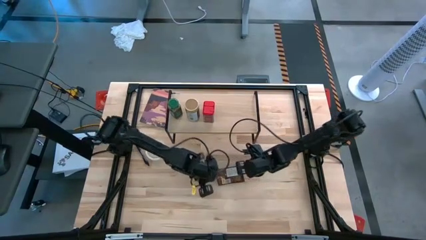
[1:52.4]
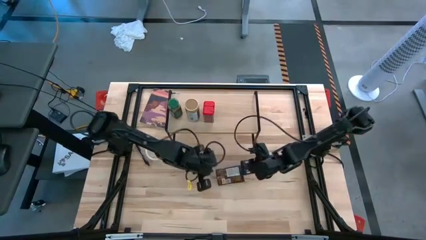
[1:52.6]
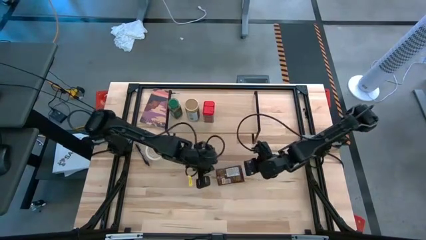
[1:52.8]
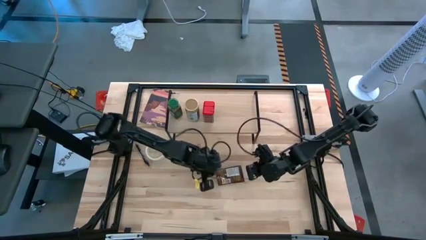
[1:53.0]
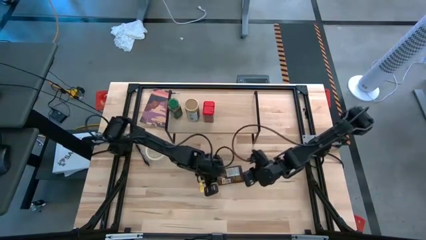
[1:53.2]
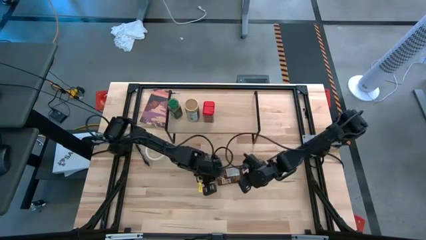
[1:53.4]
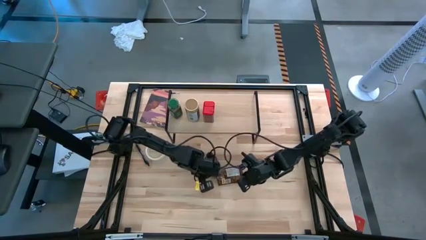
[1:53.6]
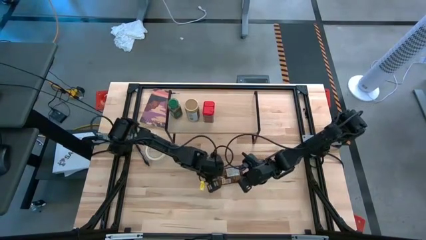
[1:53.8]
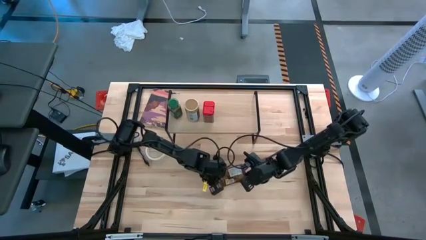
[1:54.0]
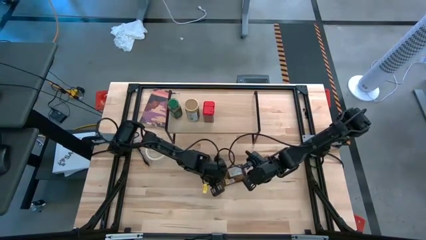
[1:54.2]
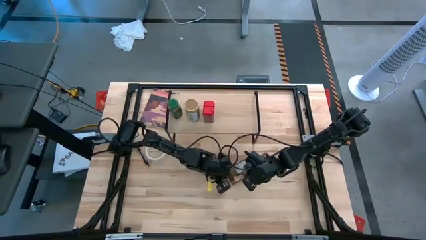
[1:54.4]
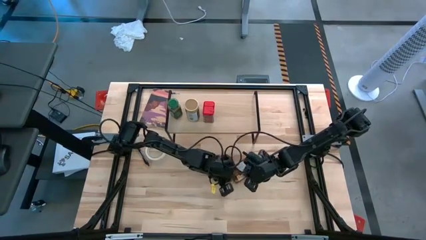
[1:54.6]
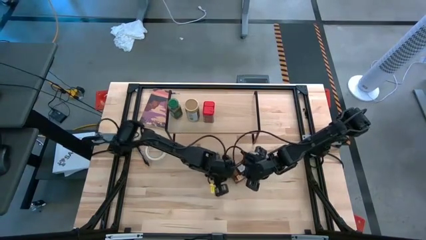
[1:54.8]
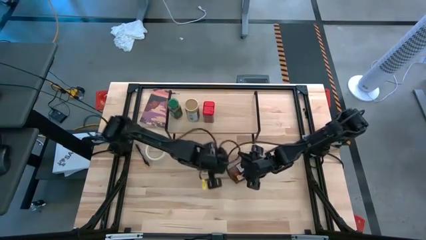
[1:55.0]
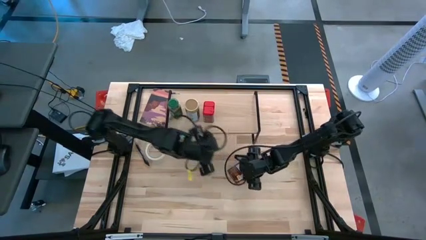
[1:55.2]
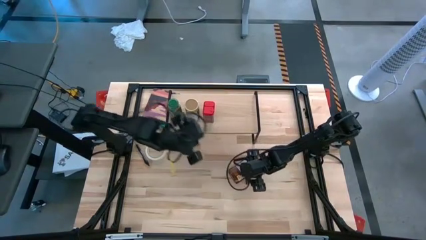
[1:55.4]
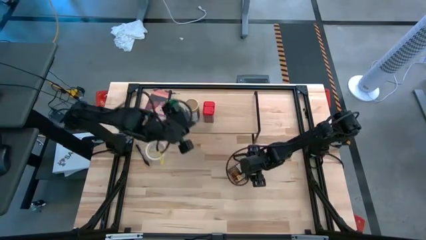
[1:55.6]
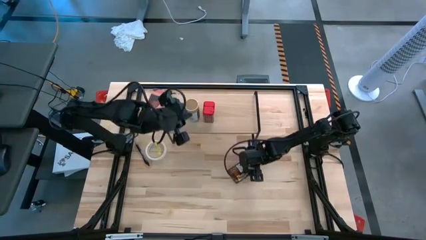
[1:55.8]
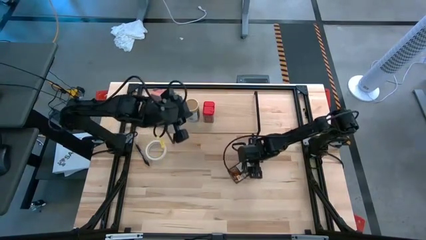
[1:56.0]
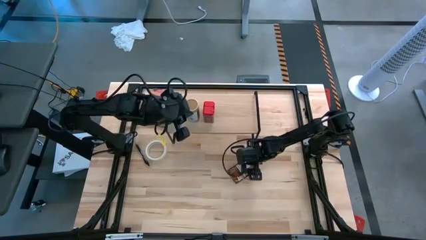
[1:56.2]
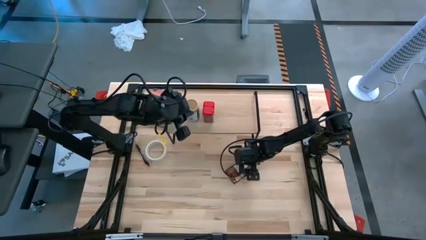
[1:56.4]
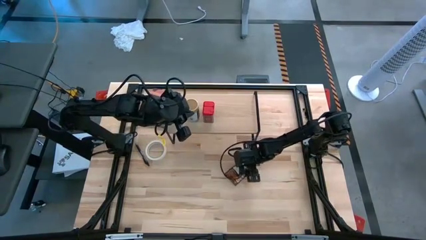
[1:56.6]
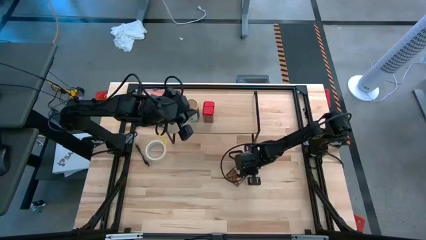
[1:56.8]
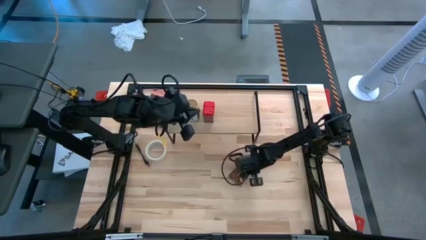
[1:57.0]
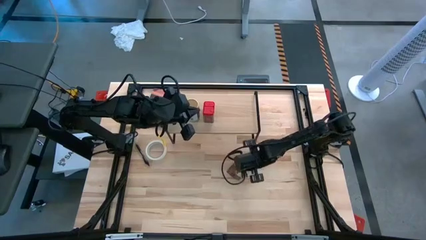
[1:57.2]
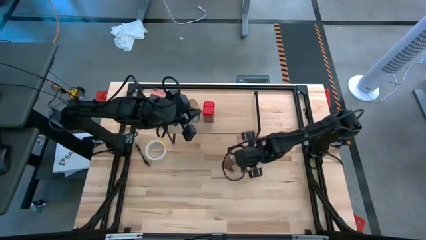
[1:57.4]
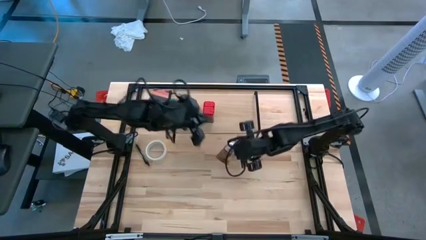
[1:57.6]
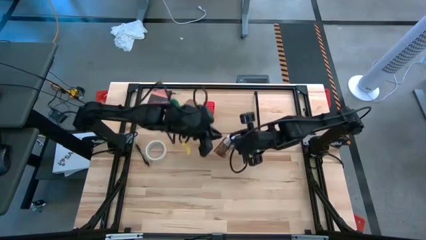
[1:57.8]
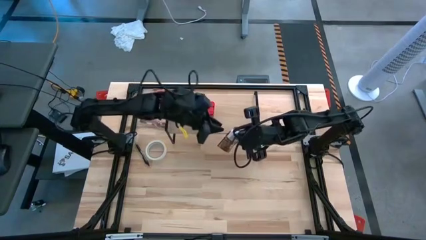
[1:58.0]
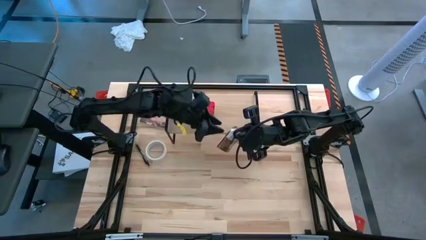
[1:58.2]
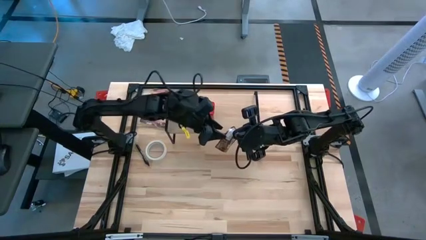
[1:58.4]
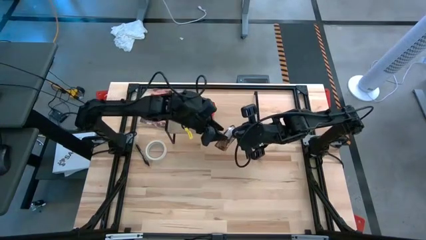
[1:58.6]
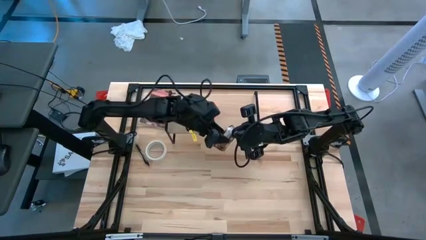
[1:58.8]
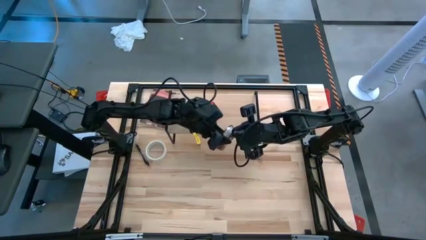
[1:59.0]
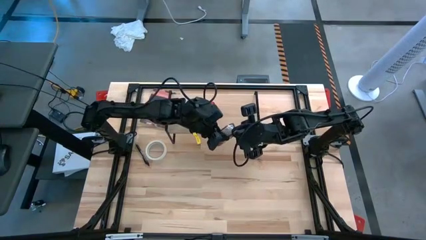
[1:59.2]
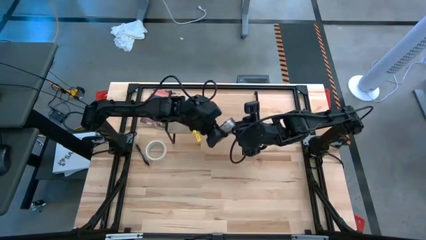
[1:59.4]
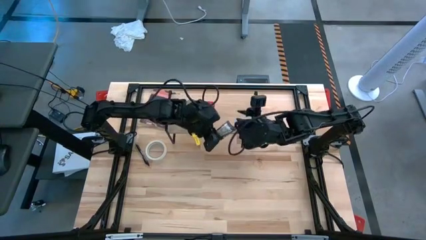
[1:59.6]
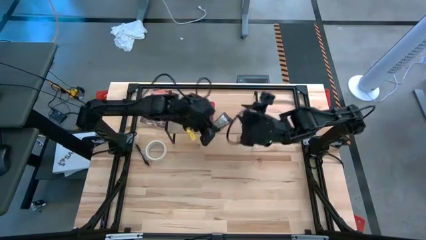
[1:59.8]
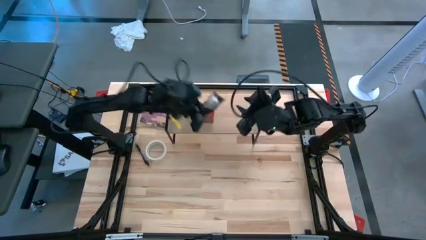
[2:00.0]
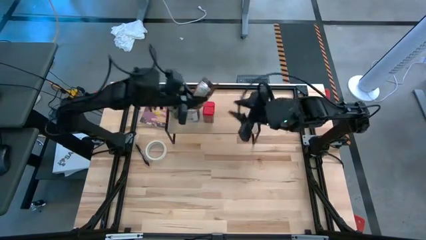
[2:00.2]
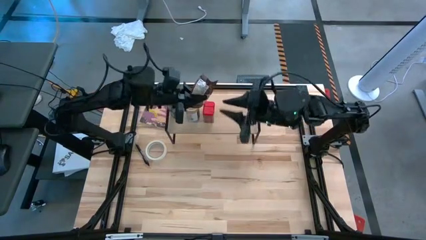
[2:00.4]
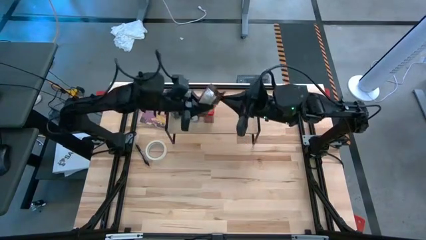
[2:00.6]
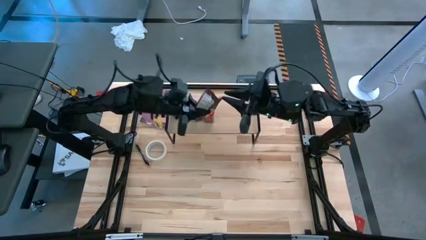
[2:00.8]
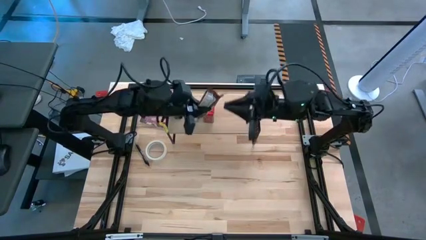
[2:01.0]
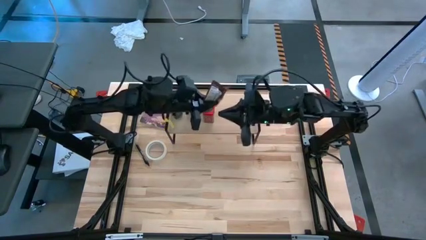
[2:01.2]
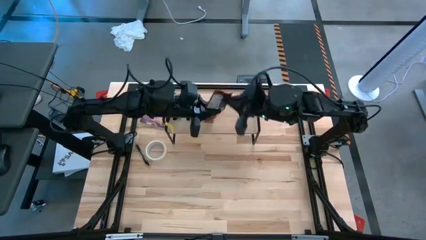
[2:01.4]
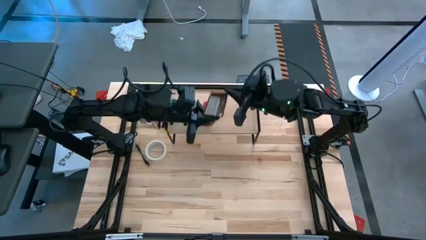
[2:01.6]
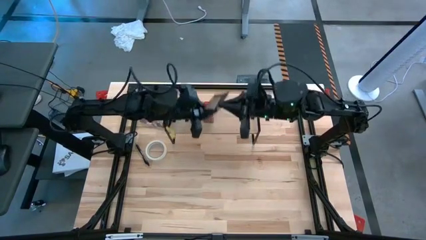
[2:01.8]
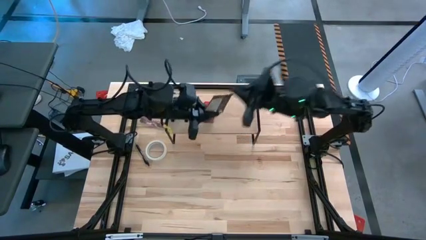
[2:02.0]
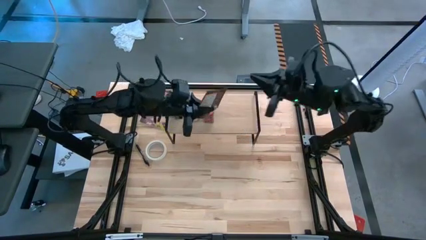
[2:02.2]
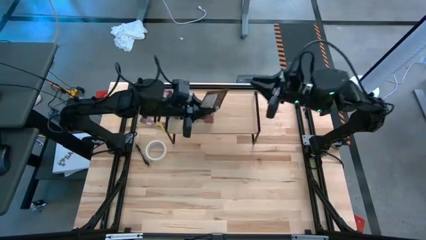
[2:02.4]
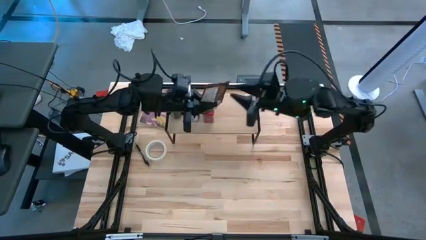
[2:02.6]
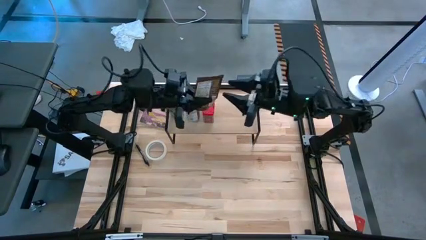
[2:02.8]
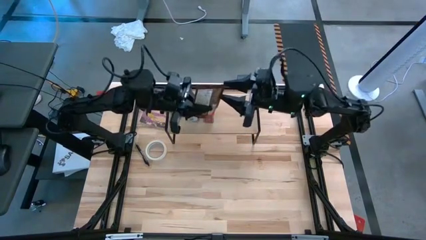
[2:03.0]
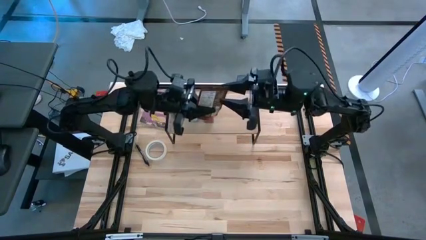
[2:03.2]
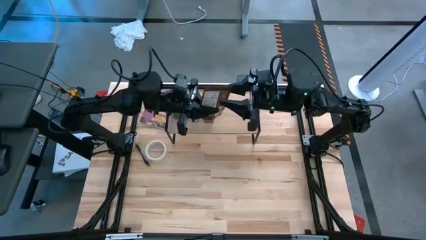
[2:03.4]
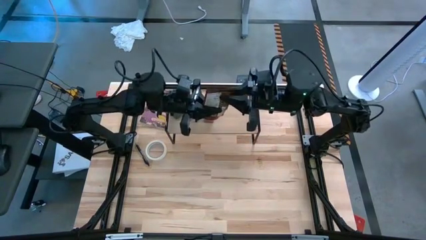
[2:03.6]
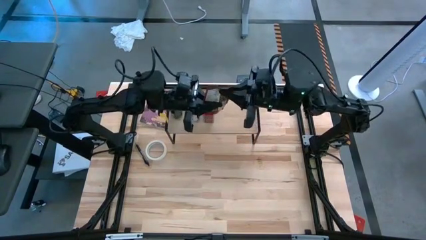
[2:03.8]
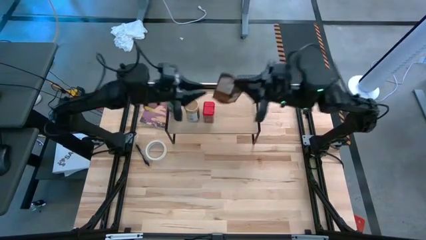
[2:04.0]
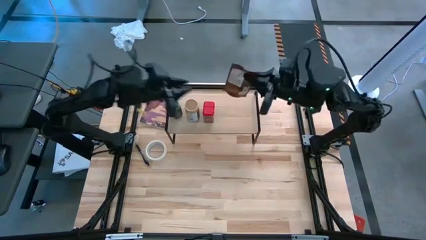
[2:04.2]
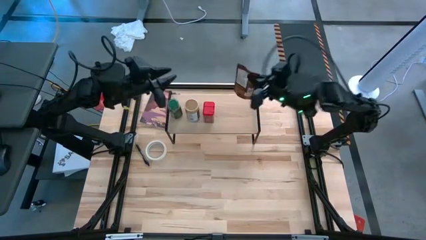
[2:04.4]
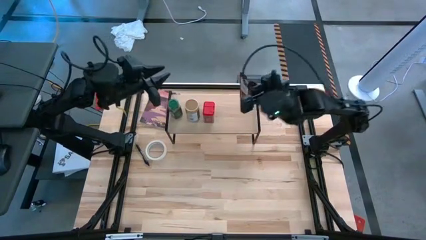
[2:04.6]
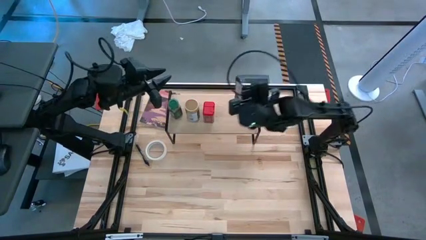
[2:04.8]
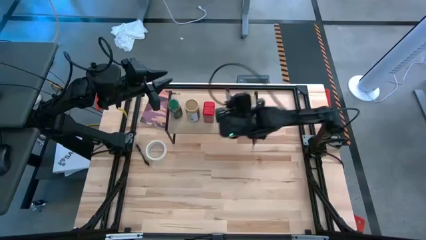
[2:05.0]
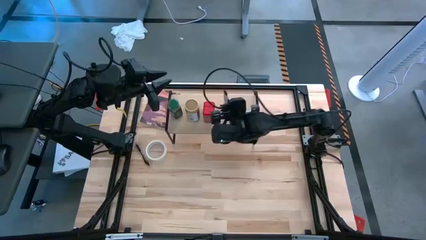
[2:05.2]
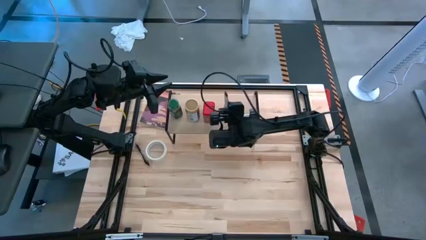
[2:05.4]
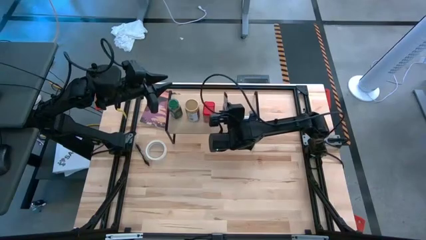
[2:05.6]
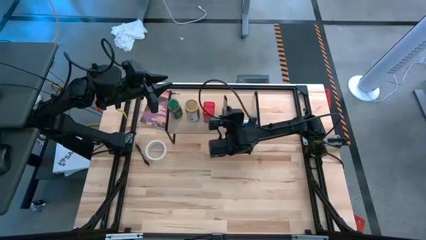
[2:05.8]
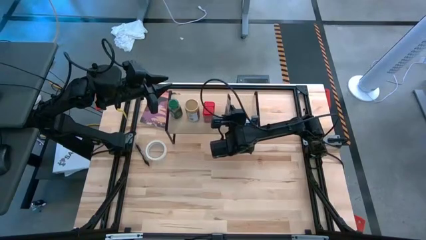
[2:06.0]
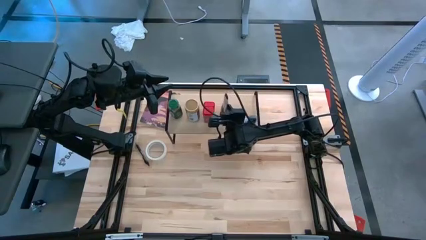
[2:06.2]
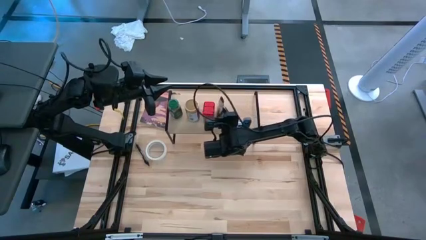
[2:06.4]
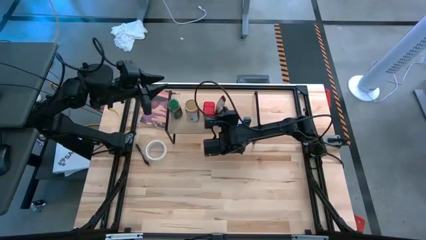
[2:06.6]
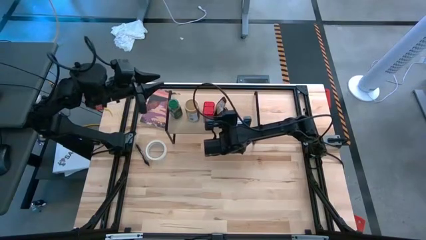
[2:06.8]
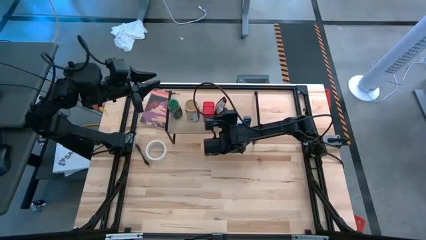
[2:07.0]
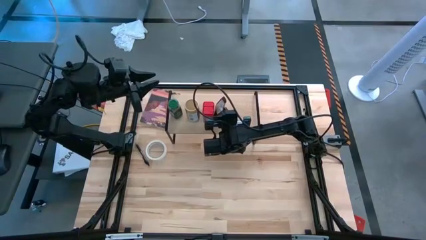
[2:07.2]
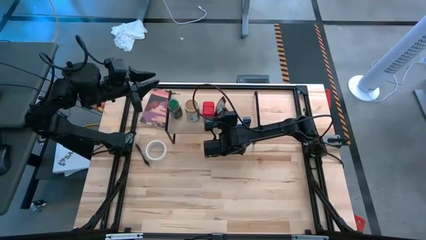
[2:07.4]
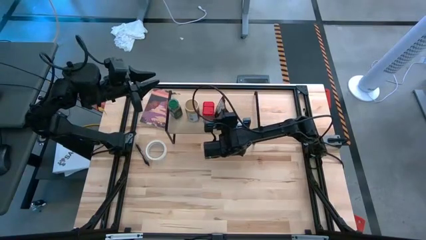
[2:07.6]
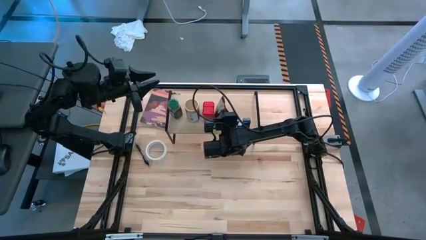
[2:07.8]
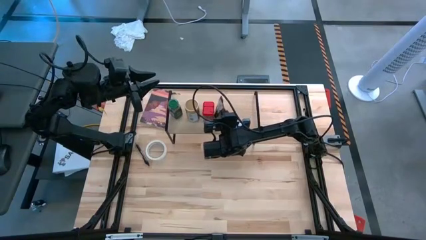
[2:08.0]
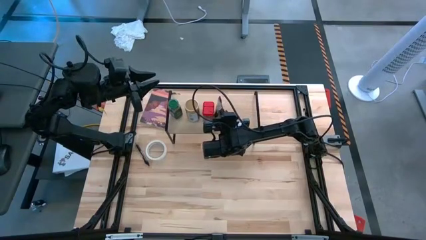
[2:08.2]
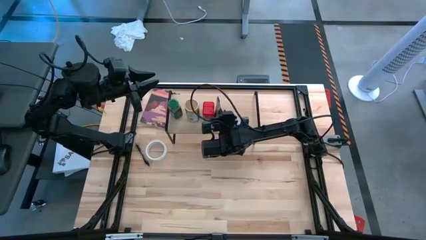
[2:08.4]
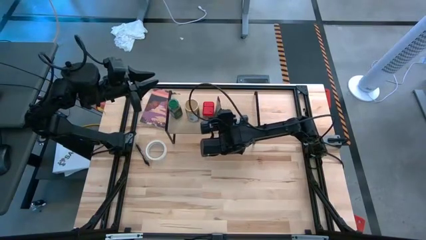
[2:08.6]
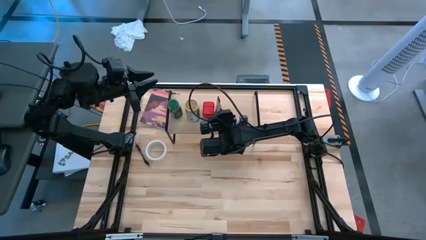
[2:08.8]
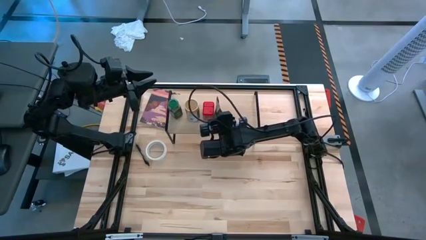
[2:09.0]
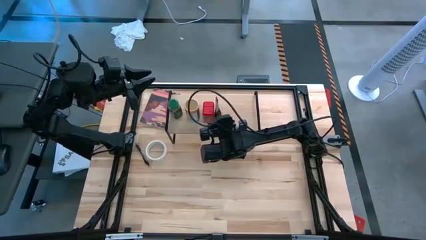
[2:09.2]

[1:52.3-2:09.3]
Task: Shelf spices
Put the brown pack on the shelf
